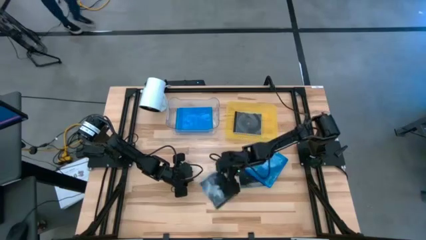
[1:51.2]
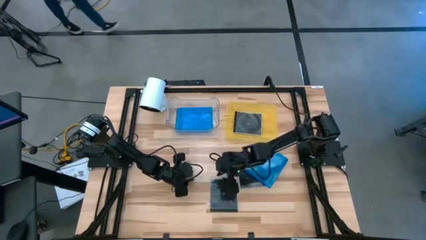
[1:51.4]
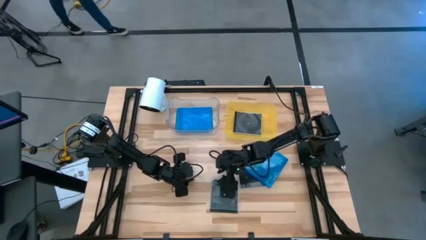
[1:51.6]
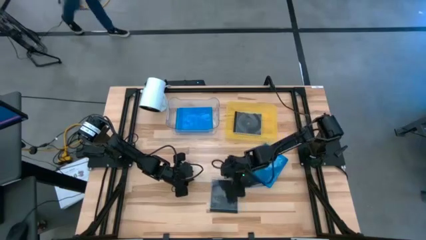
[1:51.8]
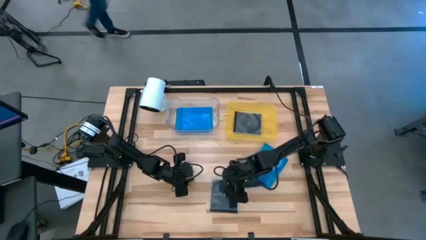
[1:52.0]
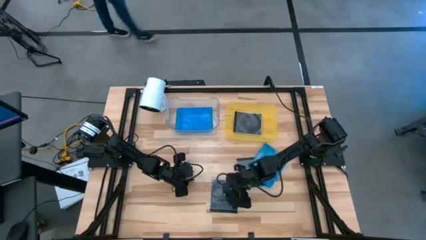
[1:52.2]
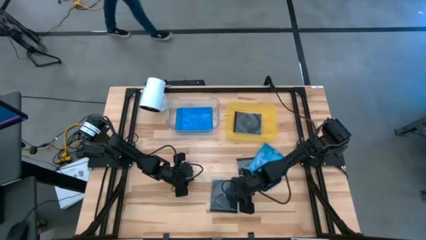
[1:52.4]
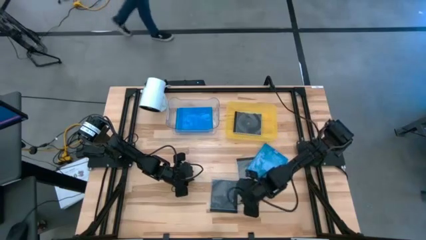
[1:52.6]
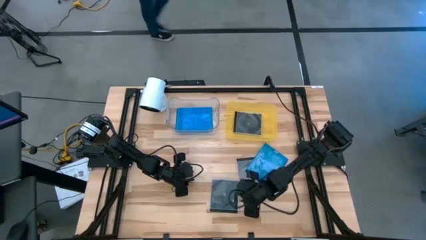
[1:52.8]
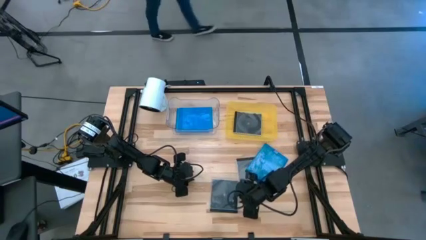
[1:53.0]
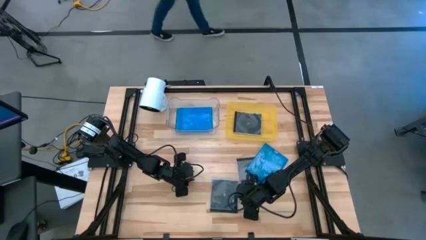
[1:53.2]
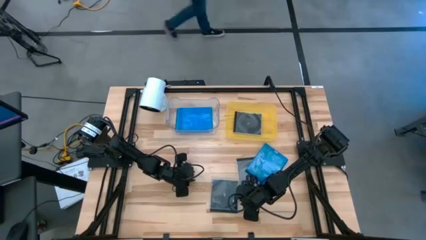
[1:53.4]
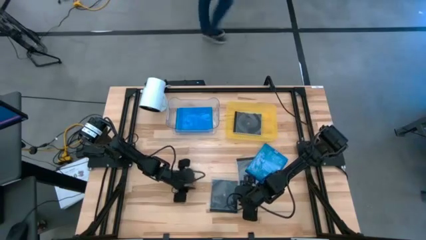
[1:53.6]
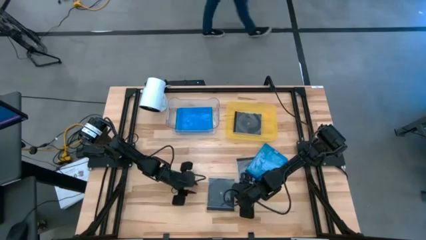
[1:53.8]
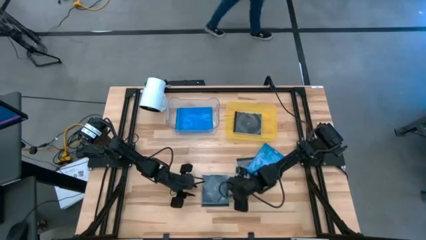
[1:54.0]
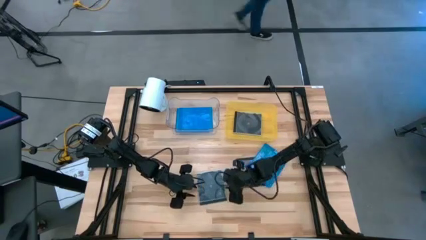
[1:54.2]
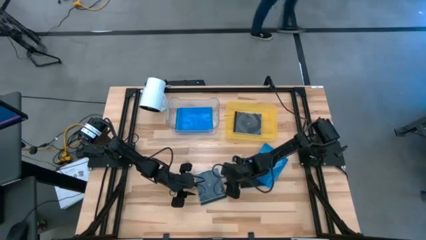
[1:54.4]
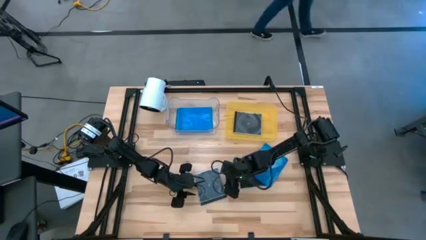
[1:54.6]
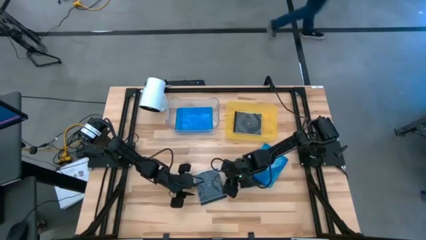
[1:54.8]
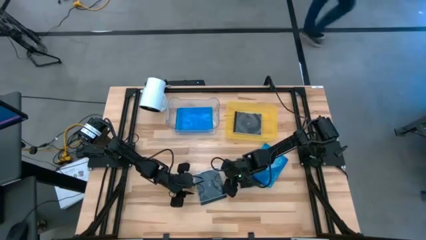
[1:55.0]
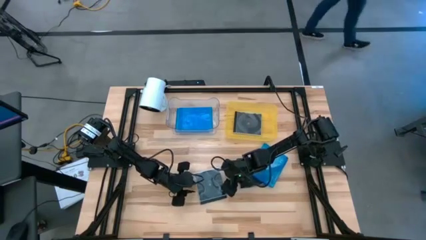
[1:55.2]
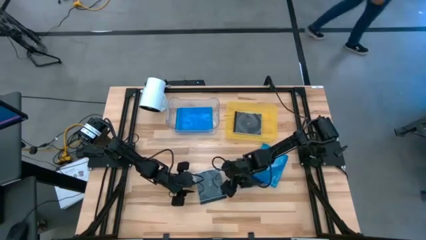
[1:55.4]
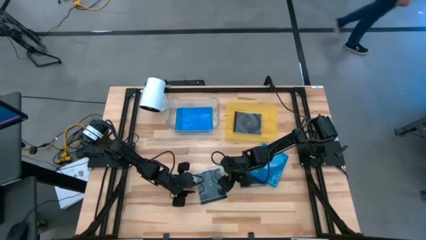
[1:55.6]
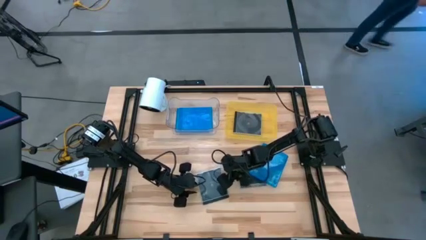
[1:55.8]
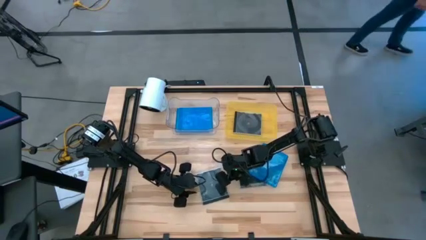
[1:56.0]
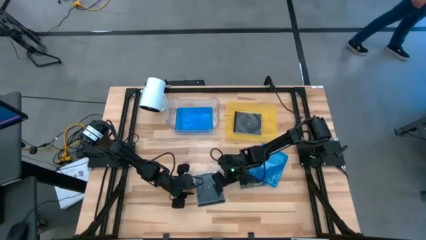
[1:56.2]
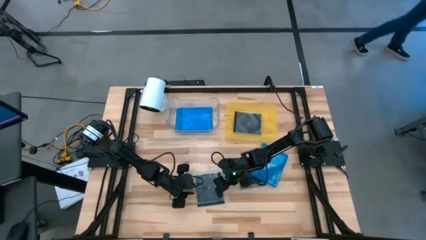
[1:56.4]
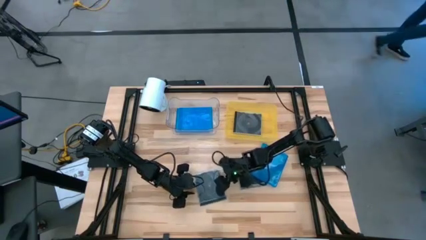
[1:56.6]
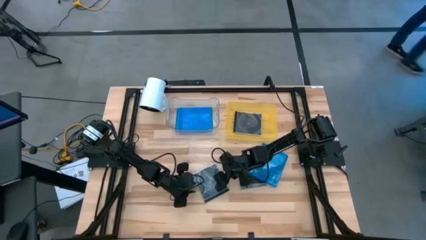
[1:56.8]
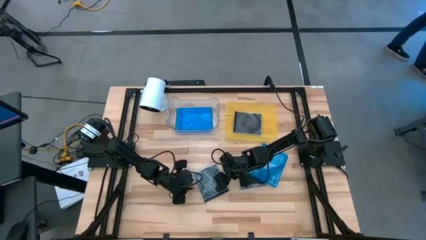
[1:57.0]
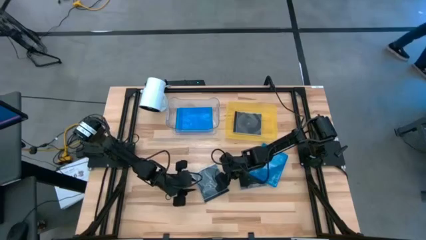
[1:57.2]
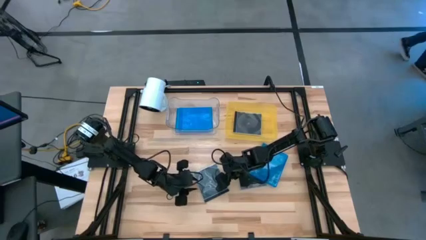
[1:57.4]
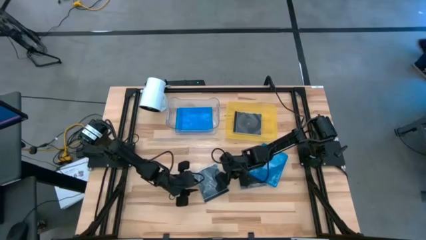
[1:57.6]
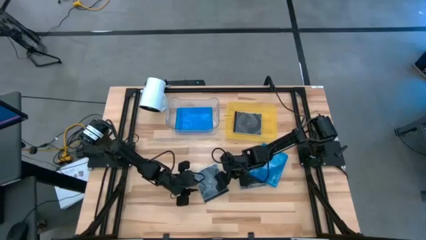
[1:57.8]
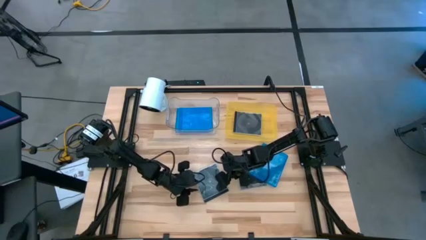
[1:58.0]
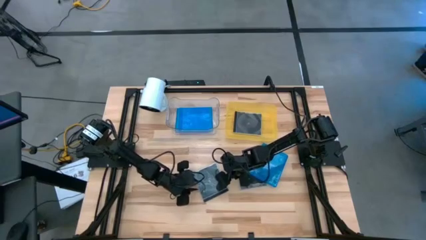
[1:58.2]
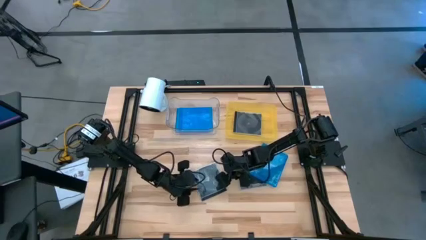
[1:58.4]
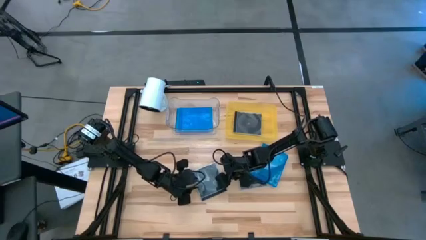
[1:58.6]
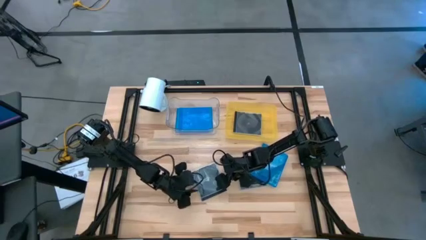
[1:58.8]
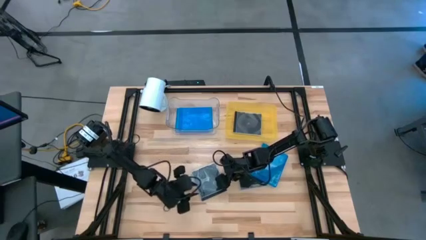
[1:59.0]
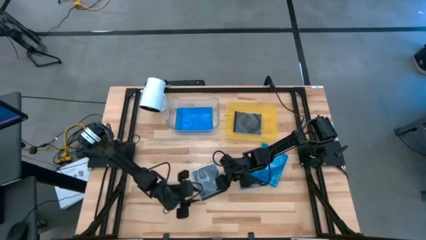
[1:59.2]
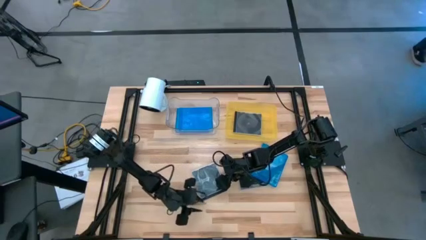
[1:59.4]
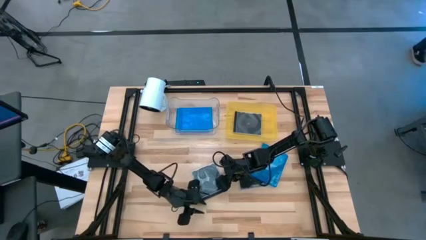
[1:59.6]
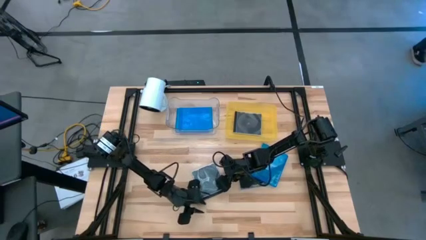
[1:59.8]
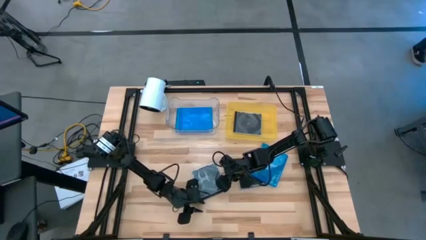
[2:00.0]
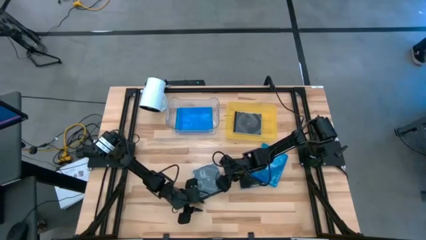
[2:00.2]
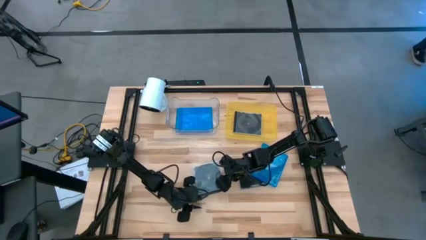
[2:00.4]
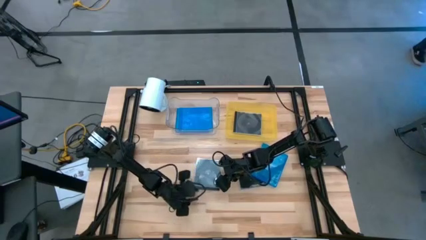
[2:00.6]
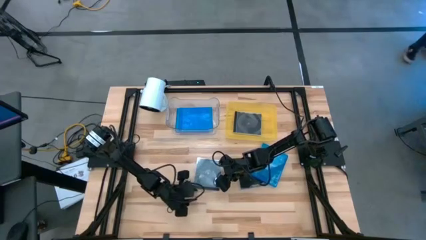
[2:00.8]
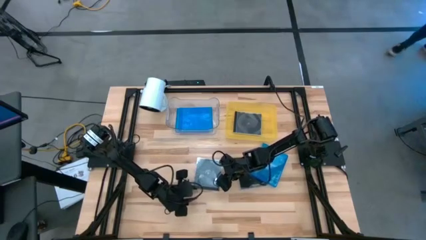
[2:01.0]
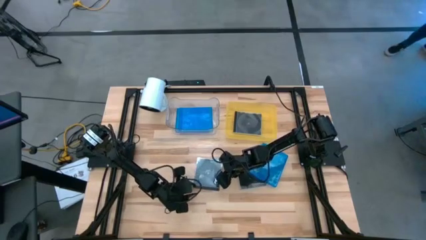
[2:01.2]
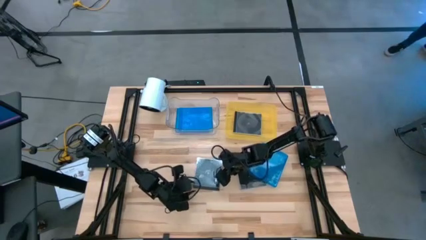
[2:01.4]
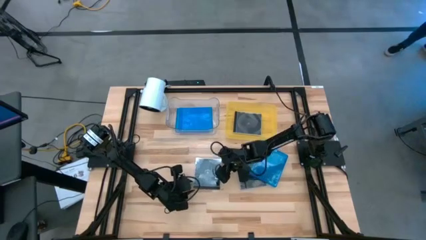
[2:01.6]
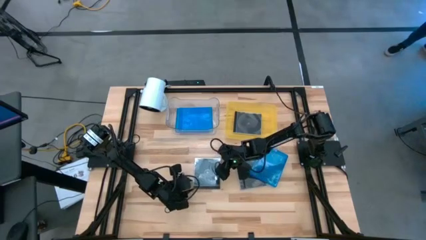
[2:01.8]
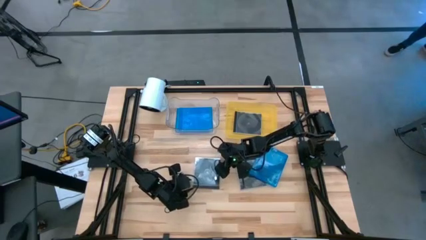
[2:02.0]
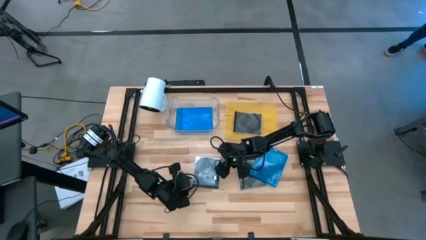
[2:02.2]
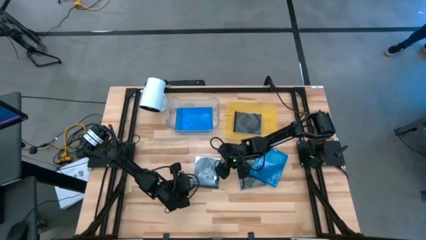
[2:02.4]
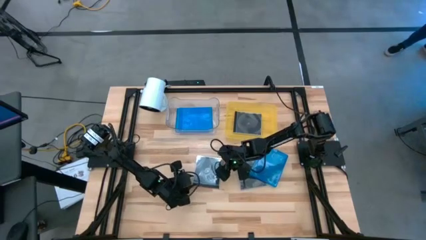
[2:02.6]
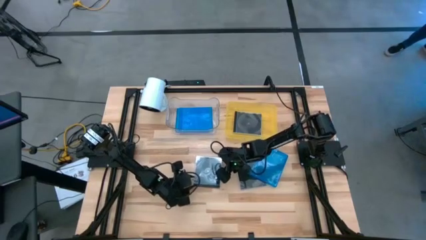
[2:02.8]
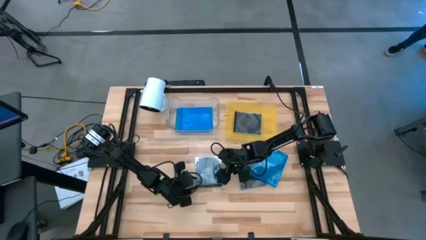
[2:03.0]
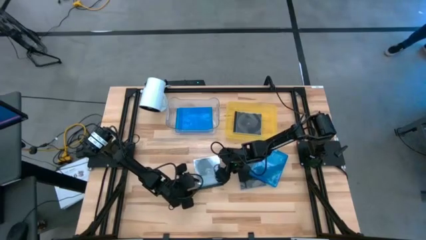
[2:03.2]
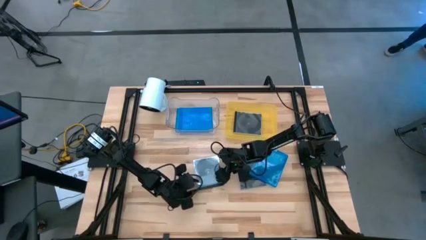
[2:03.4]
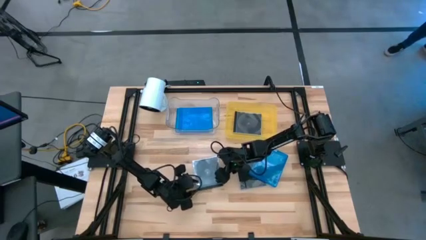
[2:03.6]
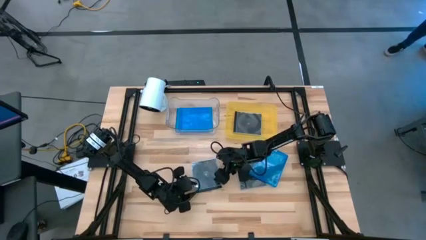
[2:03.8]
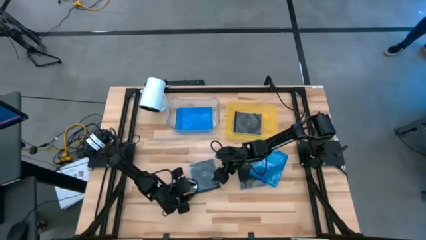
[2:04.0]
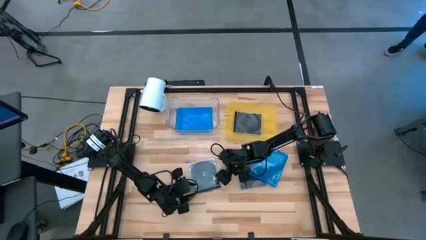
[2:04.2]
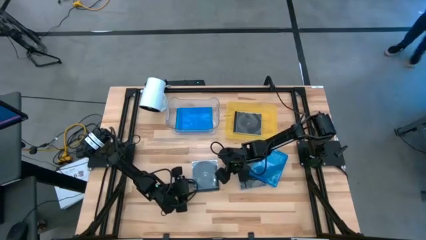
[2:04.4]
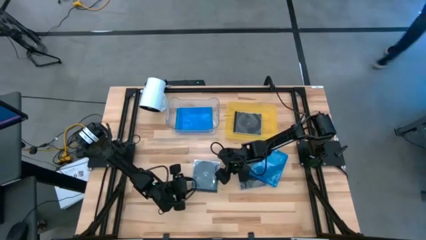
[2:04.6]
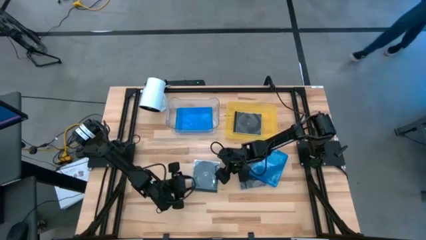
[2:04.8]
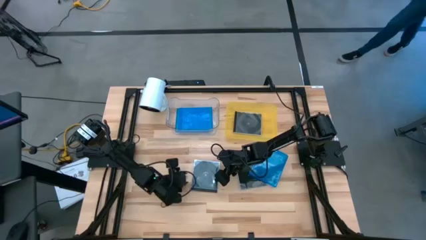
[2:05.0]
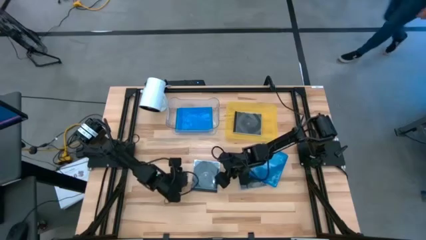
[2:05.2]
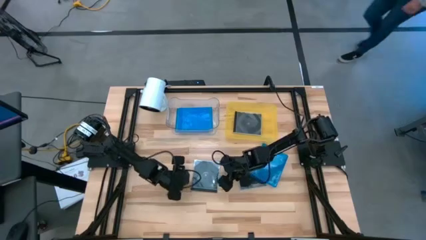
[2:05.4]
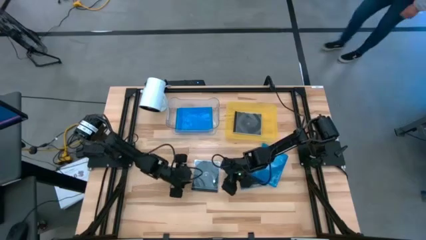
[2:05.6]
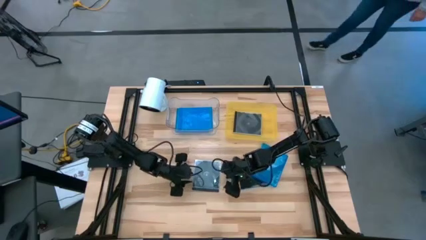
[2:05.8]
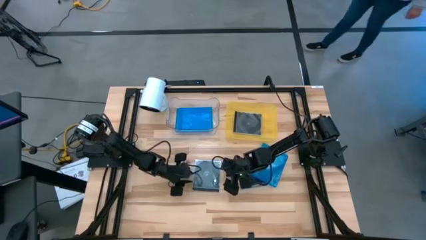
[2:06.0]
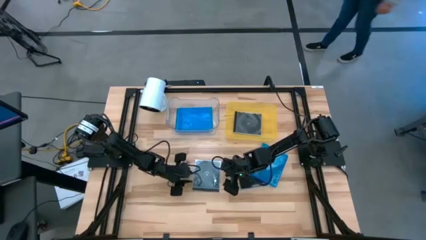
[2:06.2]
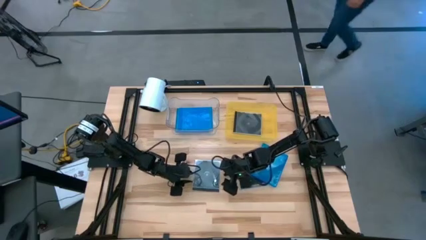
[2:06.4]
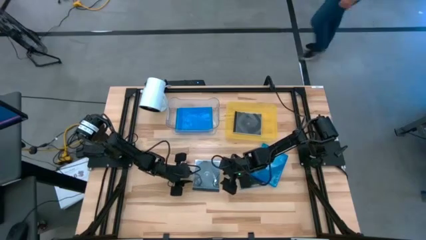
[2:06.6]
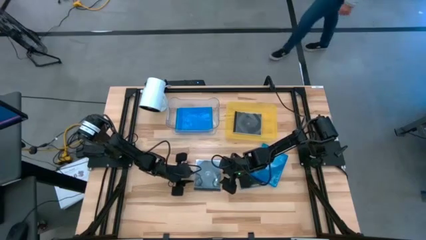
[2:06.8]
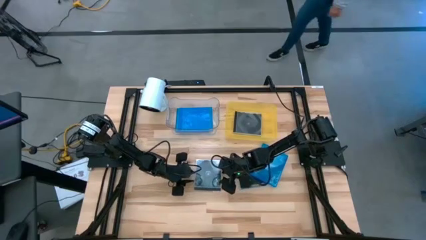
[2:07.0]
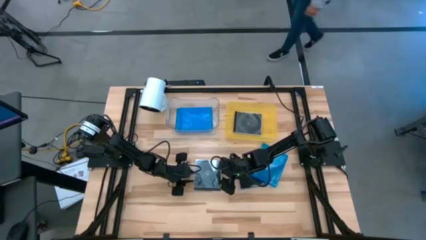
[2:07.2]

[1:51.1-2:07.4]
Task: Pick & place jewel cases by type
Put the left black CD case into the yellow bin
